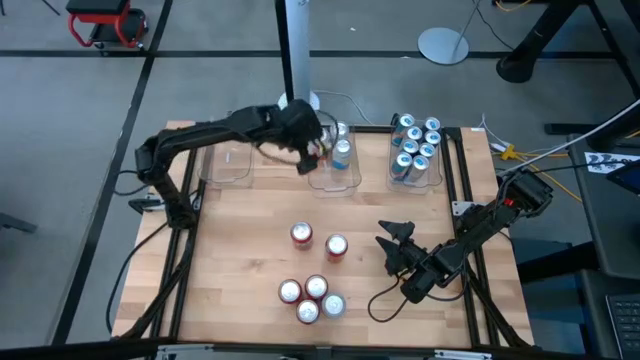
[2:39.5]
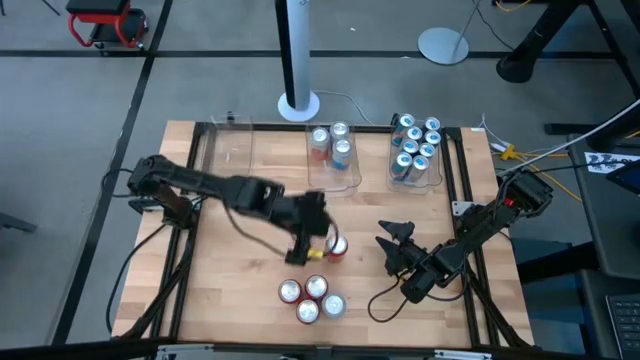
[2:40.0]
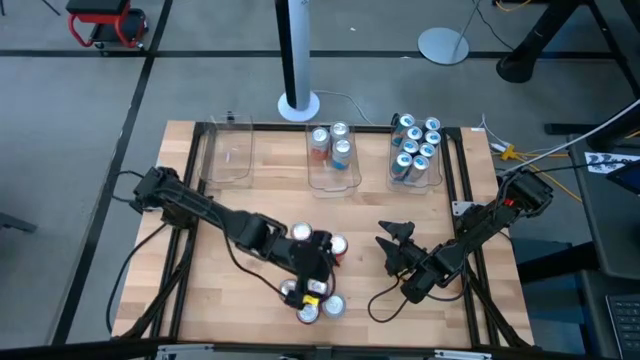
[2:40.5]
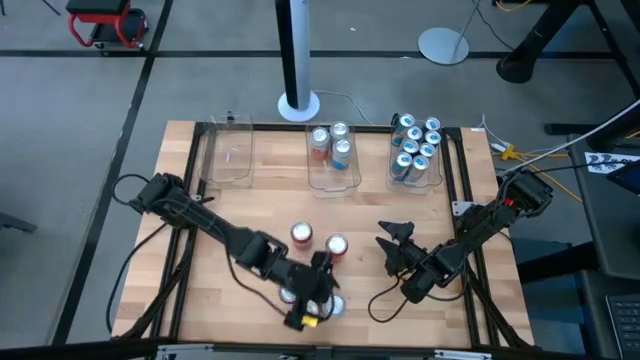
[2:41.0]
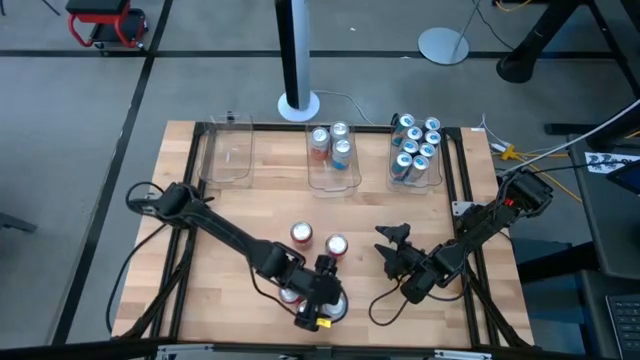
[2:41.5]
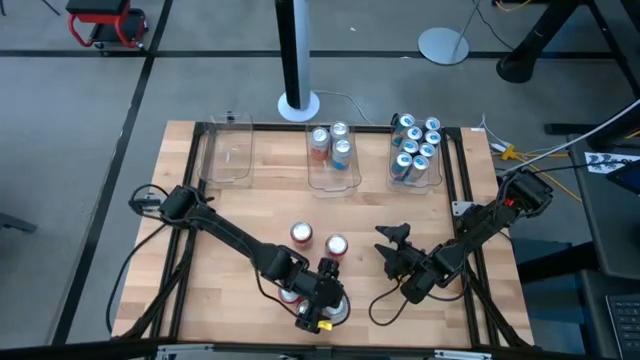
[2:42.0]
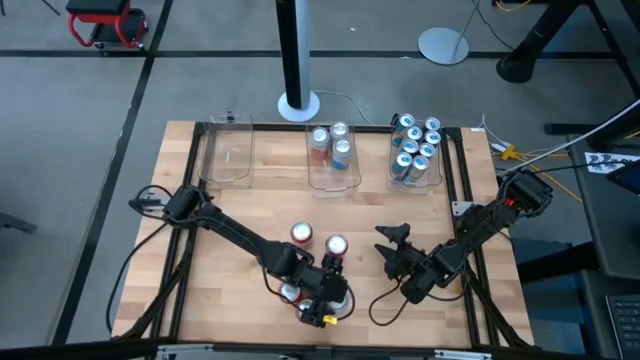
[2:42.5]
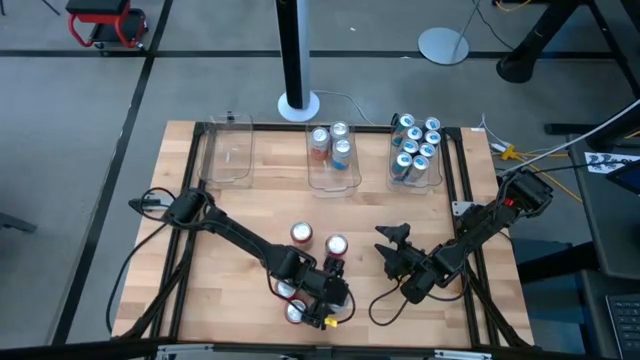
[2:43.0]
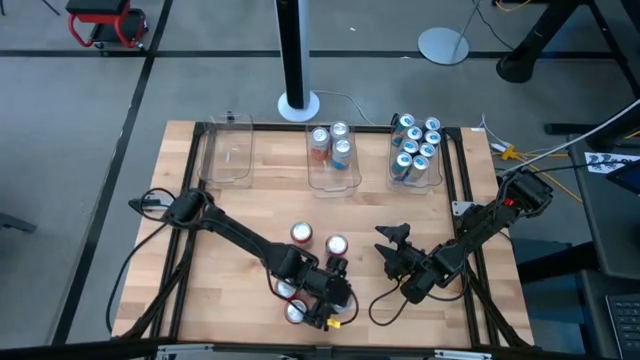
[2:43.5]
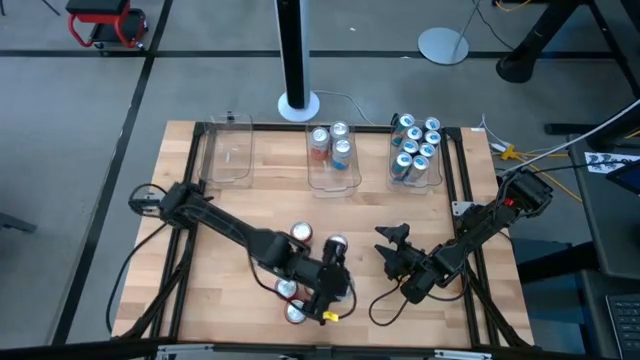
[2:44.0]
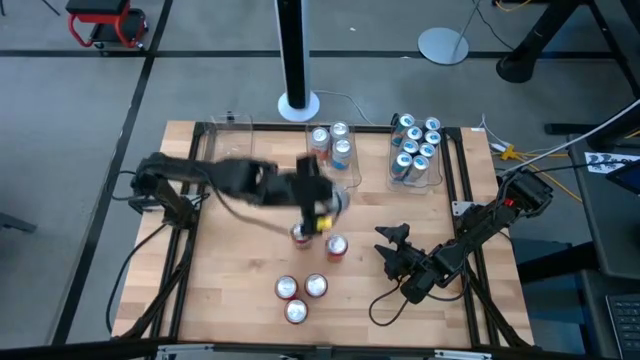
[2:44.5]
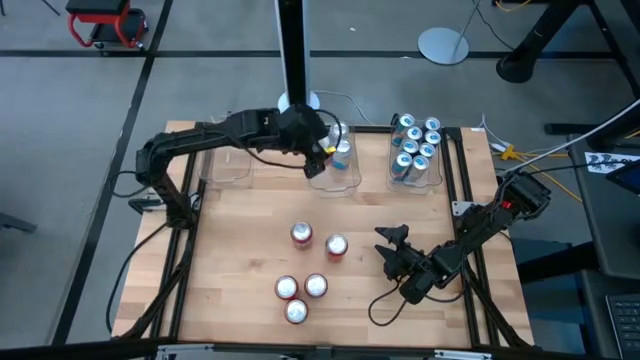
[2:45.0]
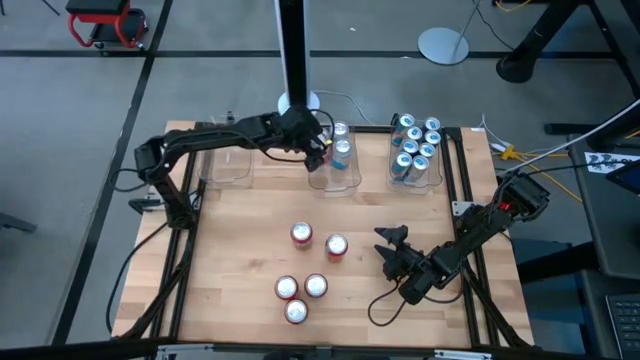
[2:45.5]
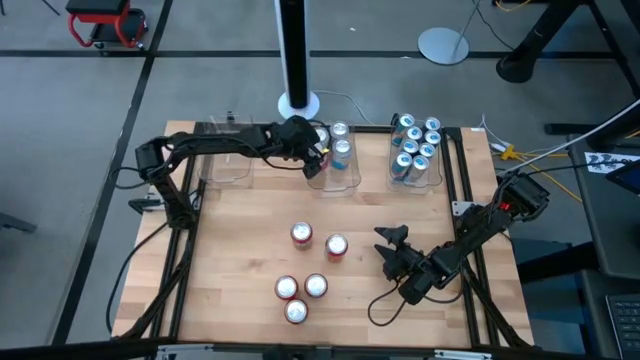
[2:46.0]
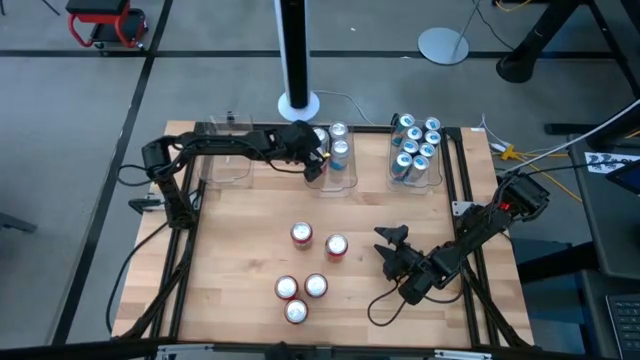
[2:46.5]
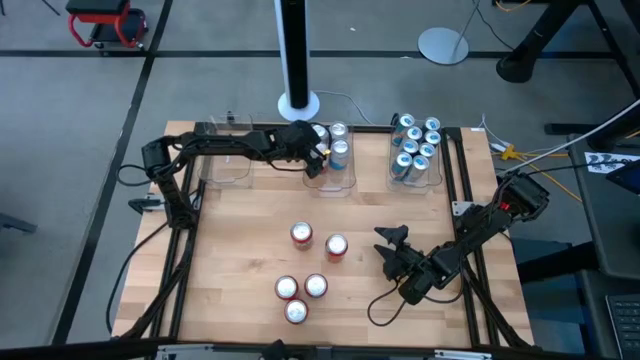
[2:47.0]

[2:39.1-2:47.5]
Task: Sort soda cans
Put the white pink soda can into the center transparent bin

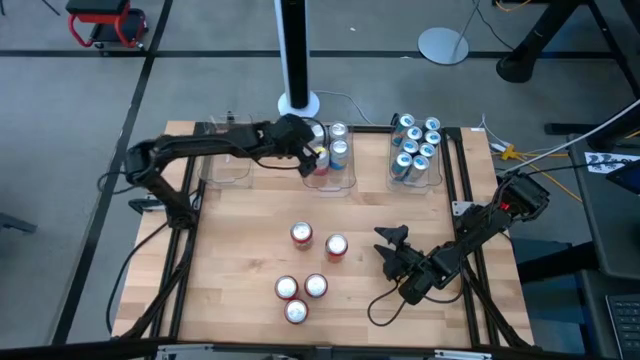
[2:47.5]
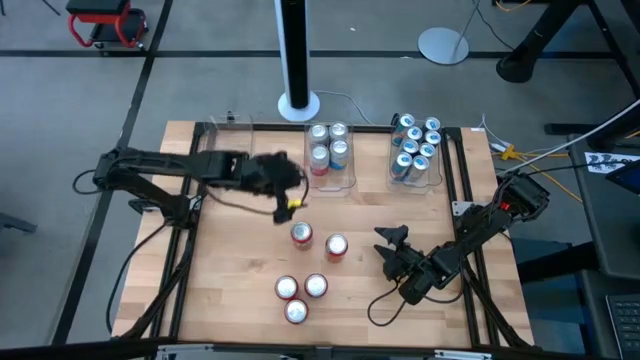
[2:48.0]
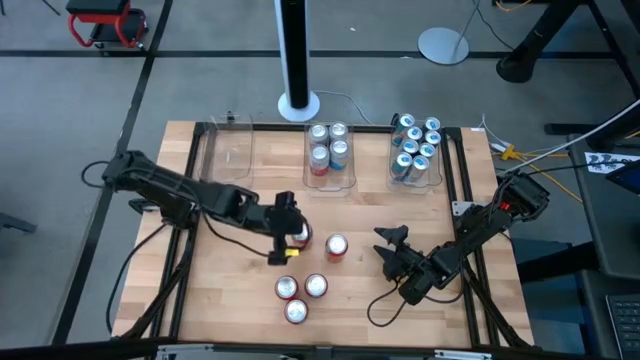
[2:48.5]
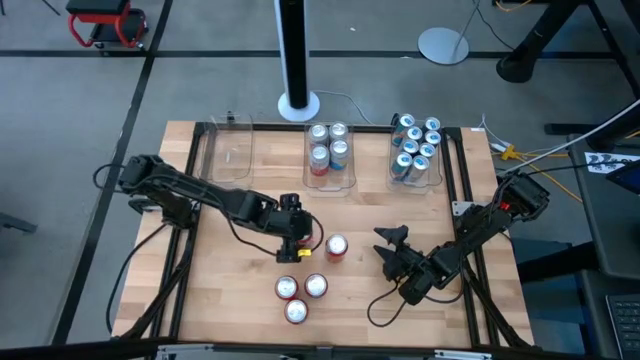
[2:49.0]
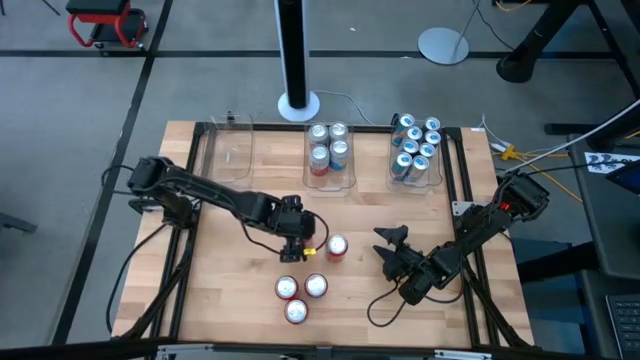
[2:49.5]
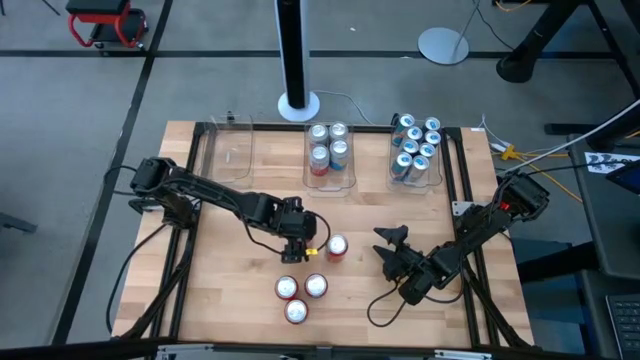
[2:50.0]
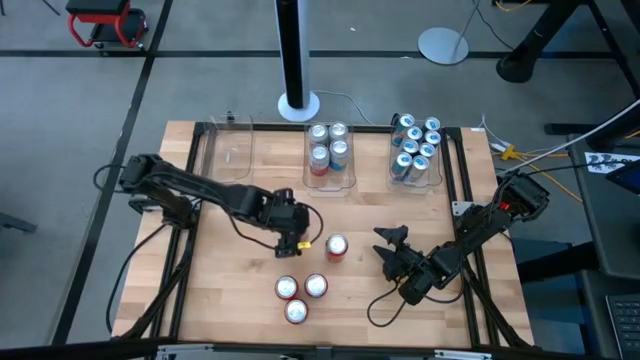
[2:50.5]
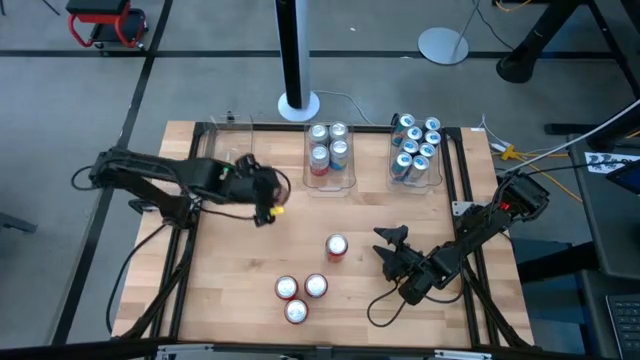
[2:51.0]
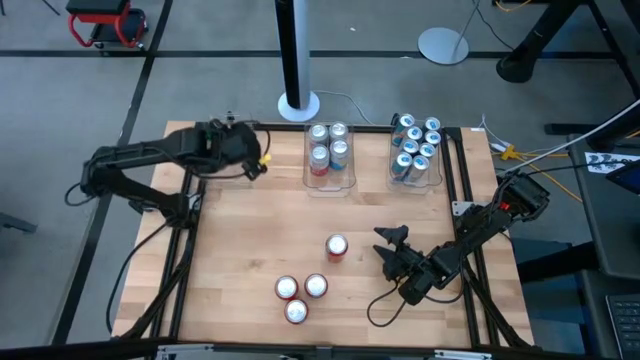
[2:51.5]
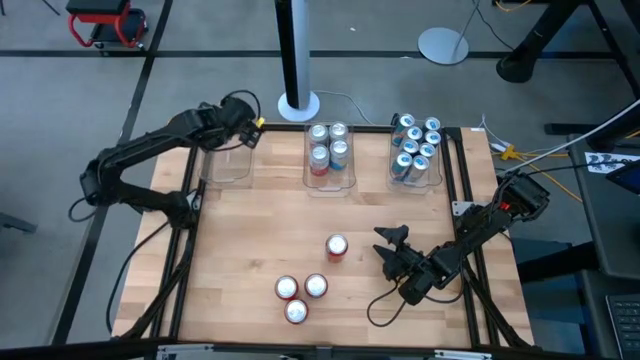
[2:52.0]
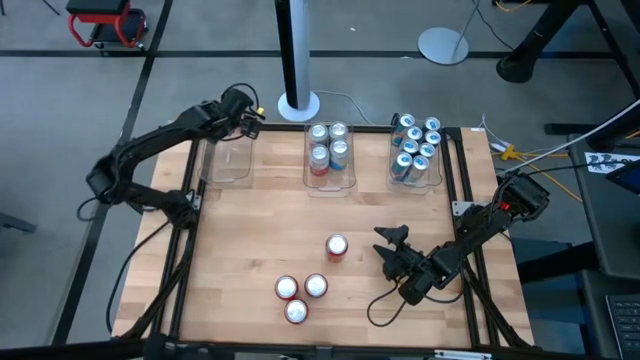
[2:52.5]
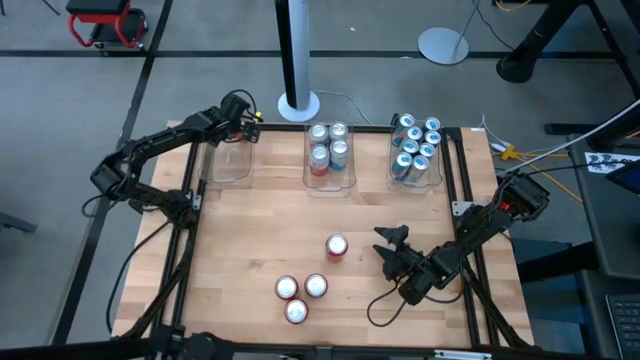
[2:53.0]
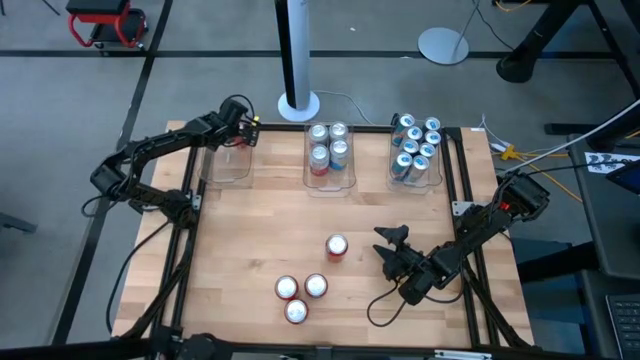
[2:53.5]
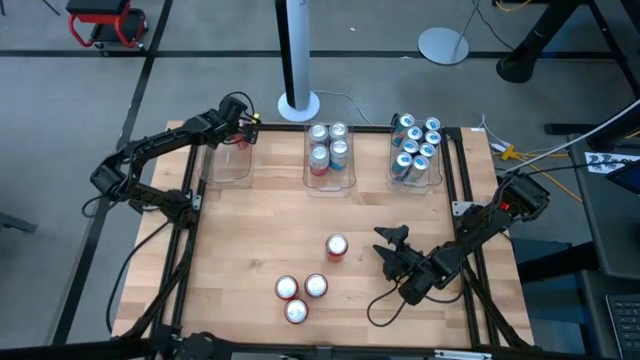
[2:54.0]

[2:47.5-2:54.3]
Put the red soda can into the top left transparent bin

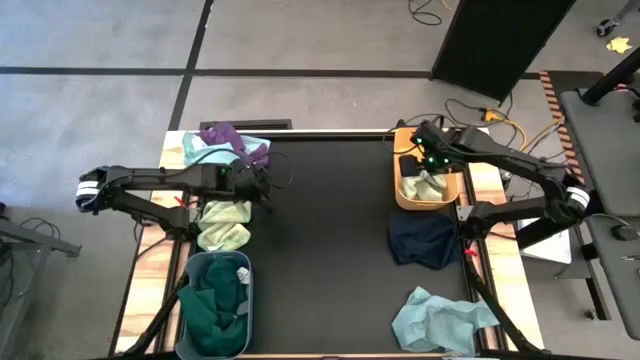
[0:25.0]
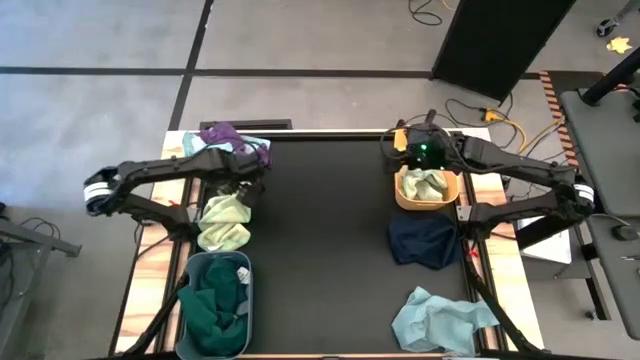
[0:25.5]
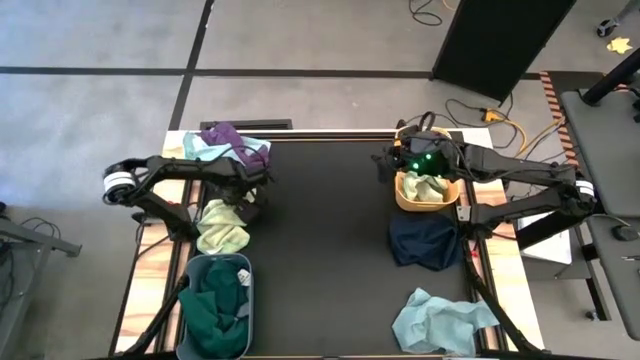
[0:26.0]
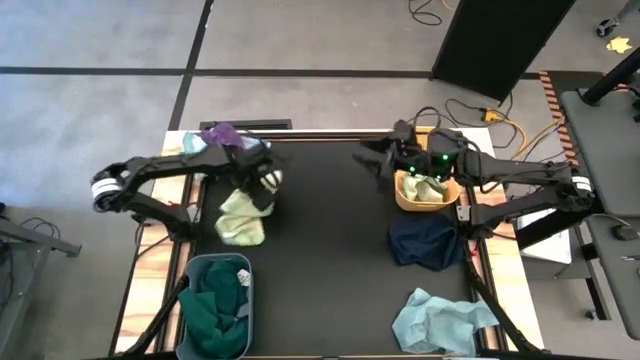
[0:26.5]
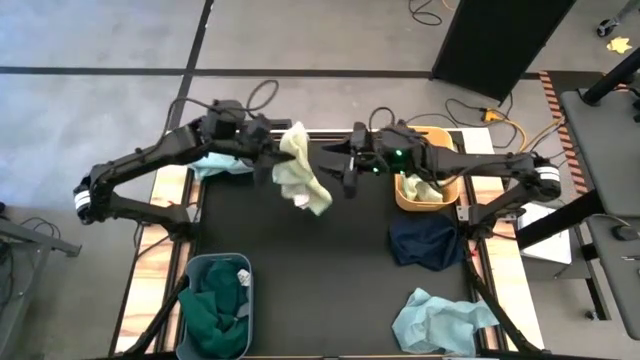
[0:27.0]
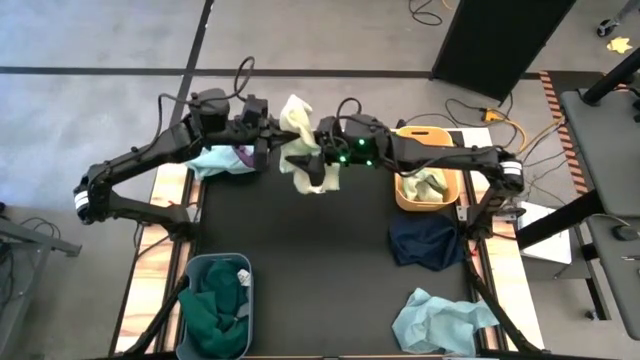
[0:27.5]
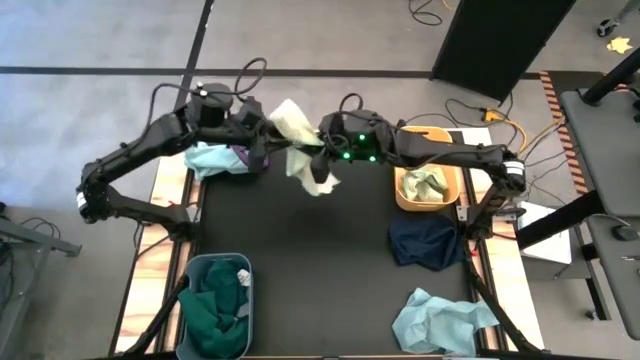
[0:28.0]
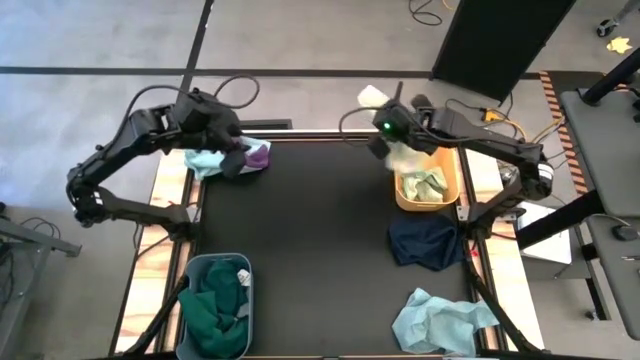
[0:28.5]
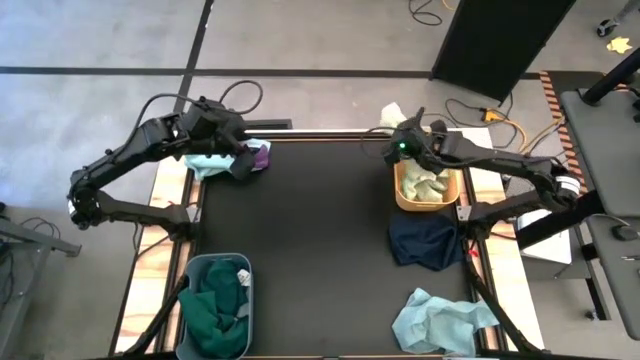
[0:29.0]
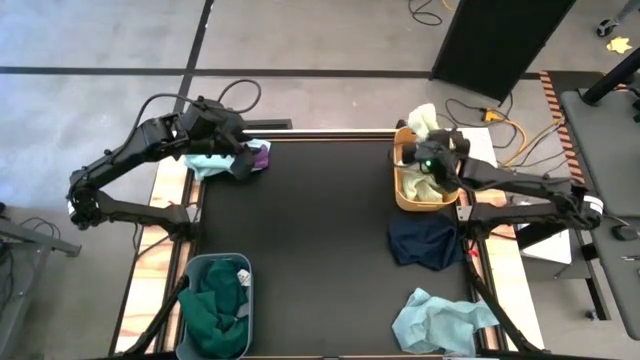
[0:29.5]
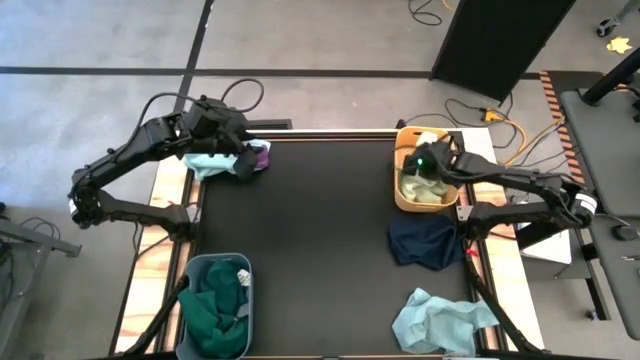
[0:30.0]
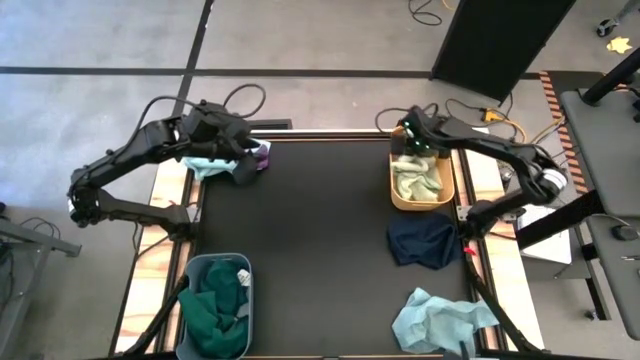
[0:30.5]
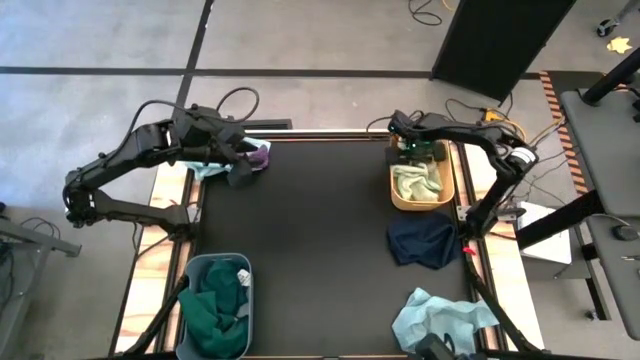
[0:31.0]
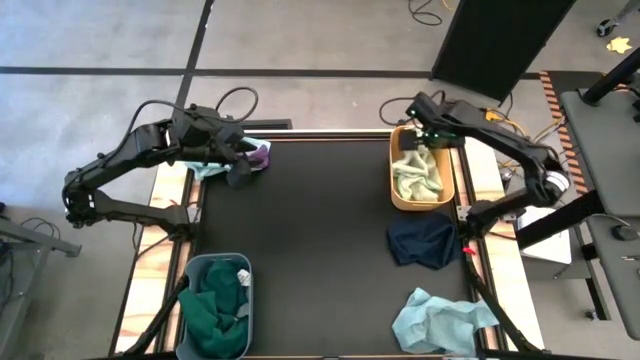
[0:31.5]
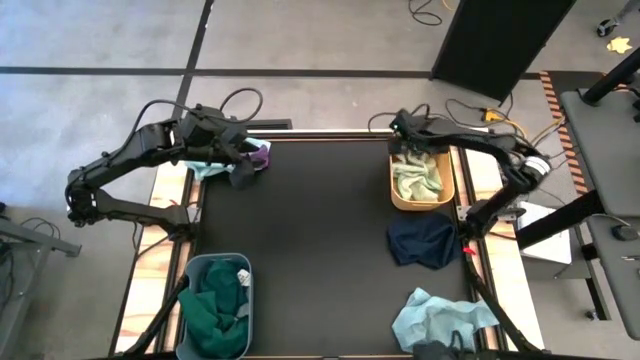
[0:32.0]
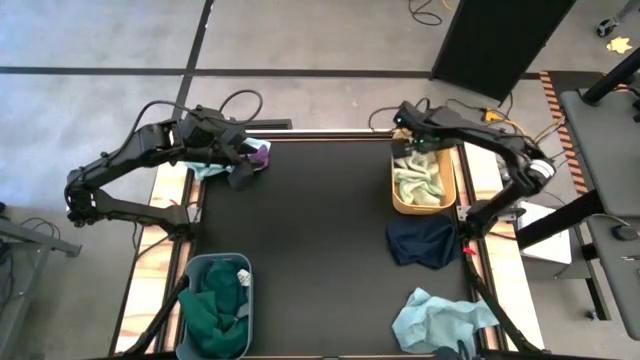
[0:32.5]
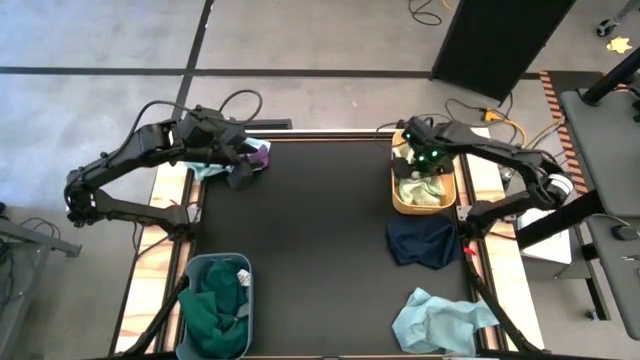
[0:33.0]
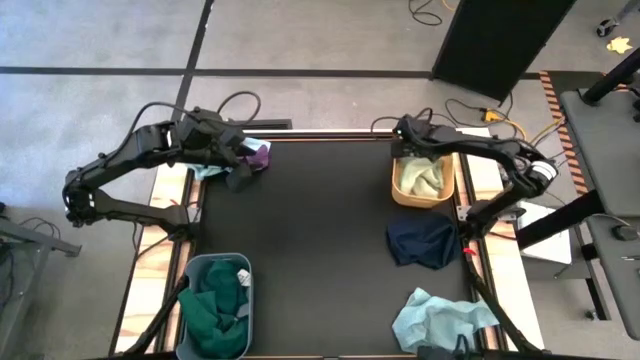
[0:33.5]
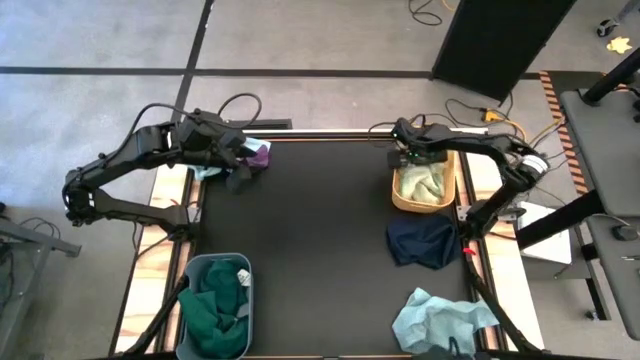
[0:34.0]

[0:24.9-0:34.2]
Task: Sort microfiber towel by color & place in baskets
Put the light green microfiber towel into the yellow bin
